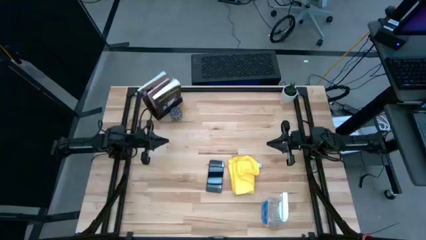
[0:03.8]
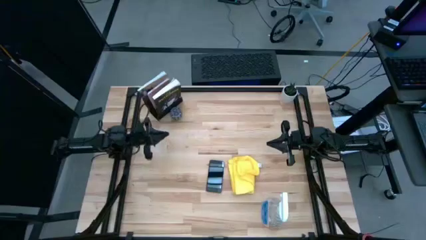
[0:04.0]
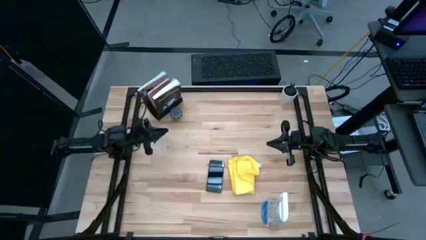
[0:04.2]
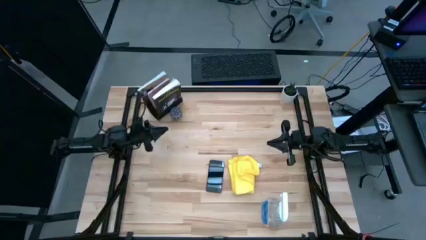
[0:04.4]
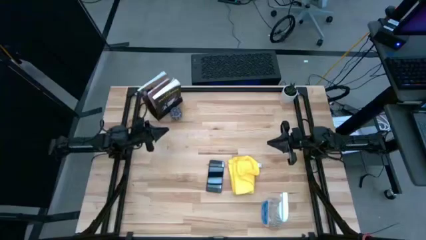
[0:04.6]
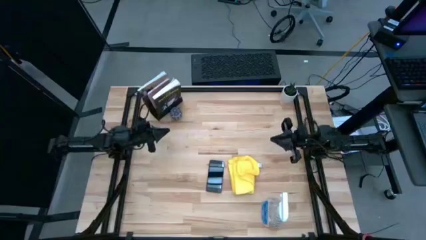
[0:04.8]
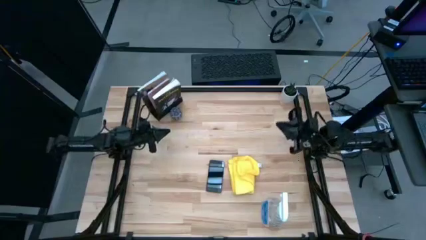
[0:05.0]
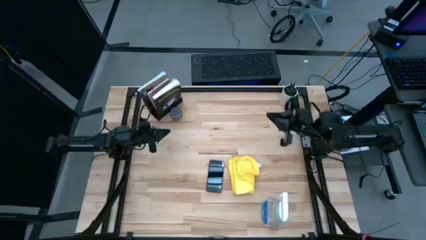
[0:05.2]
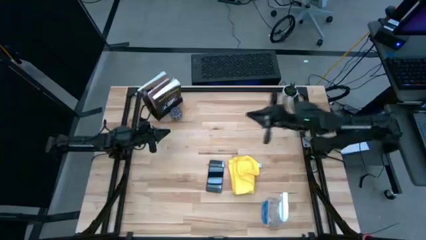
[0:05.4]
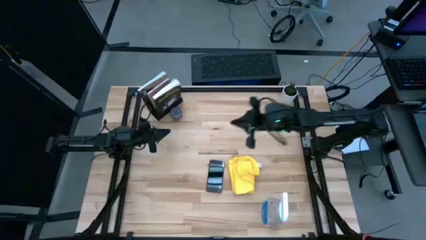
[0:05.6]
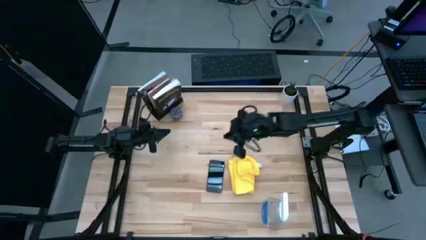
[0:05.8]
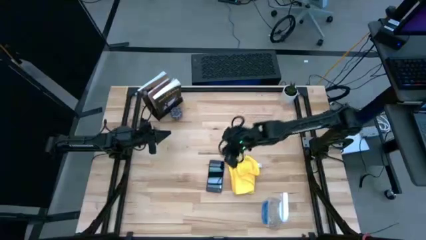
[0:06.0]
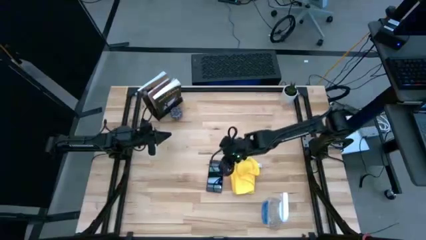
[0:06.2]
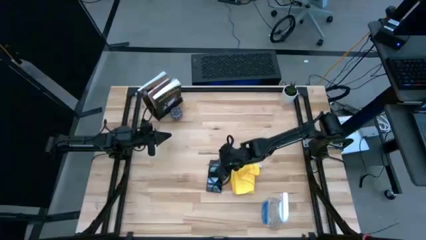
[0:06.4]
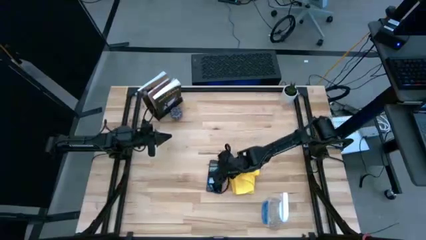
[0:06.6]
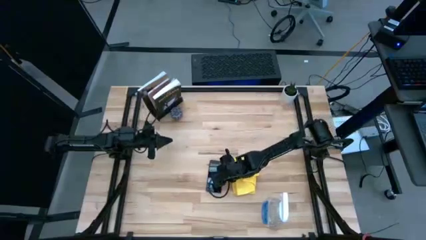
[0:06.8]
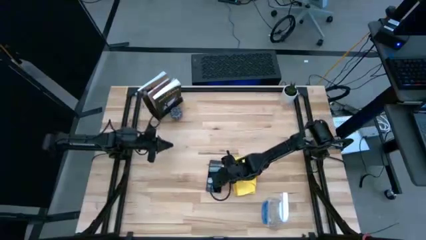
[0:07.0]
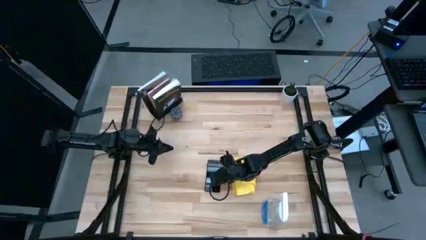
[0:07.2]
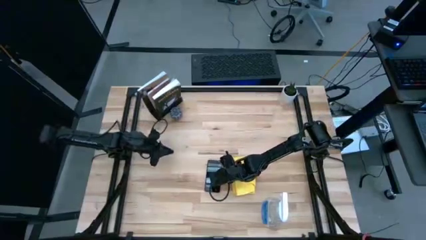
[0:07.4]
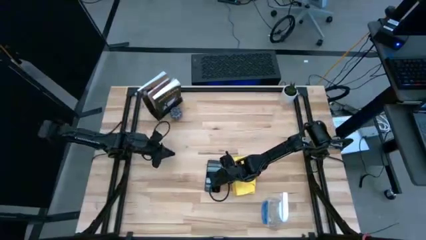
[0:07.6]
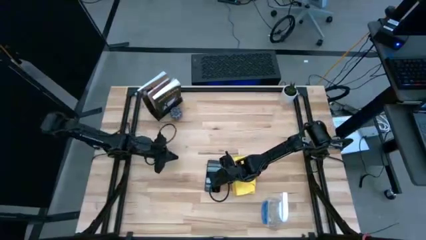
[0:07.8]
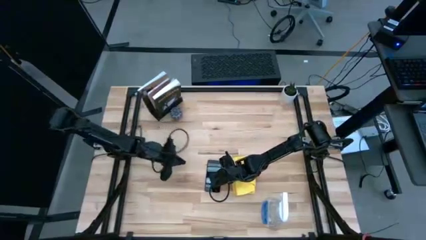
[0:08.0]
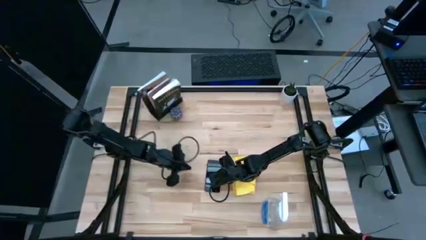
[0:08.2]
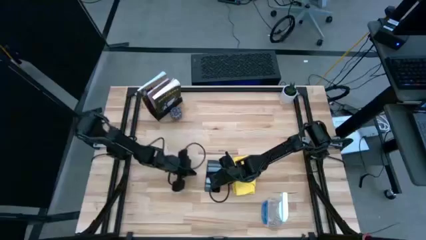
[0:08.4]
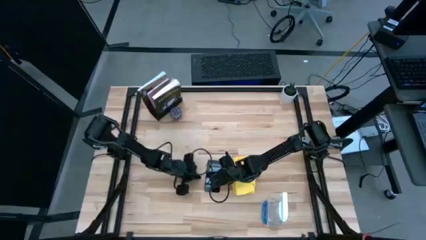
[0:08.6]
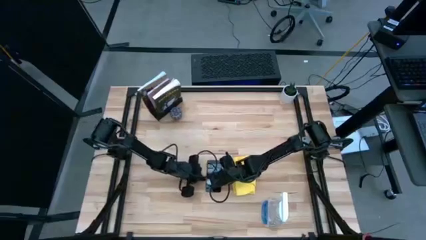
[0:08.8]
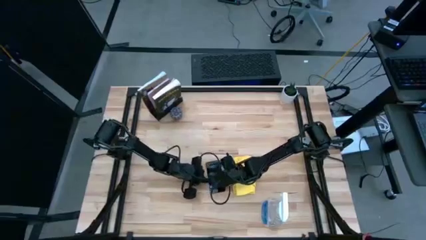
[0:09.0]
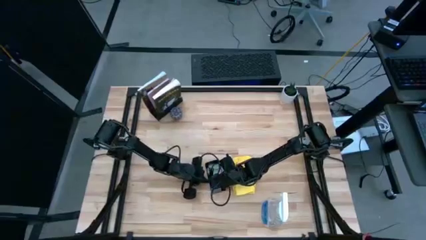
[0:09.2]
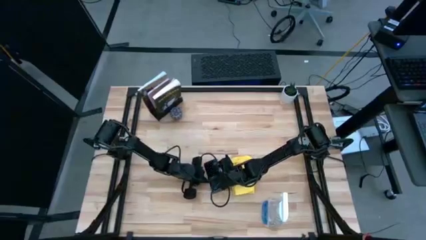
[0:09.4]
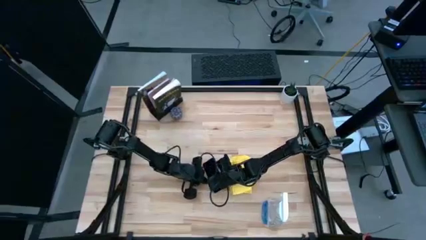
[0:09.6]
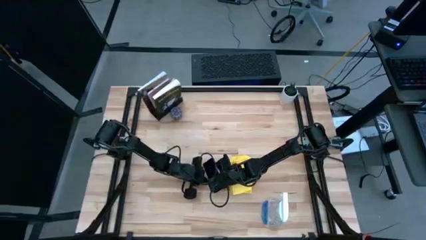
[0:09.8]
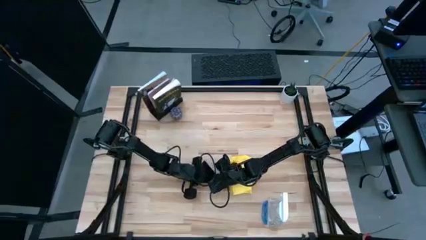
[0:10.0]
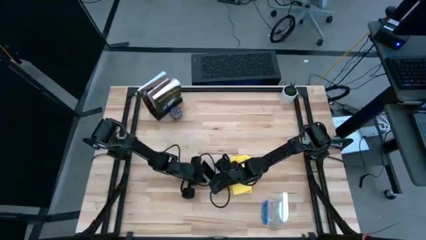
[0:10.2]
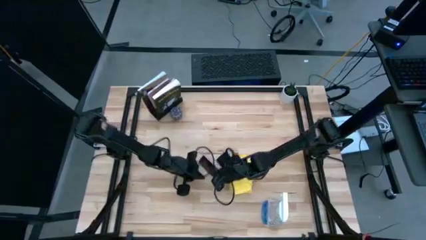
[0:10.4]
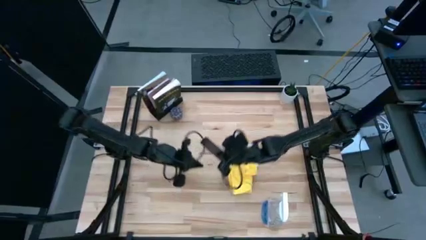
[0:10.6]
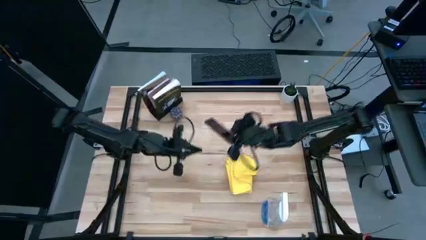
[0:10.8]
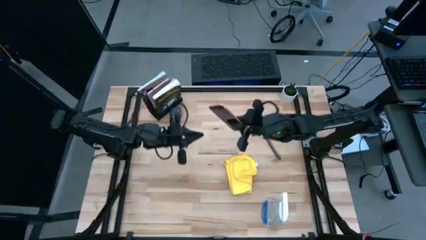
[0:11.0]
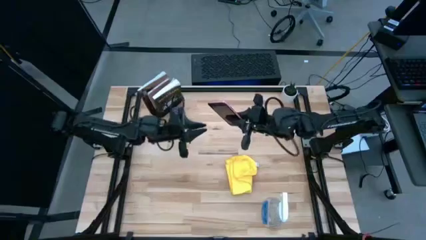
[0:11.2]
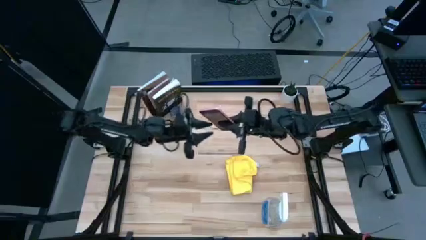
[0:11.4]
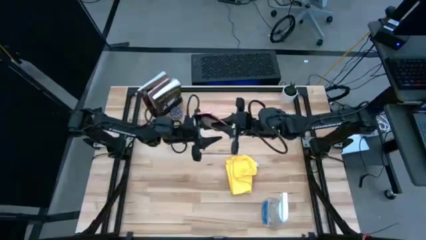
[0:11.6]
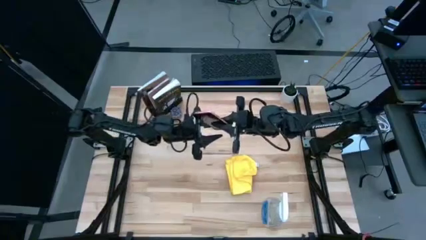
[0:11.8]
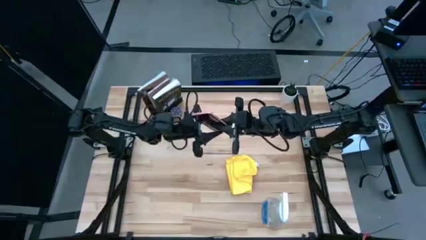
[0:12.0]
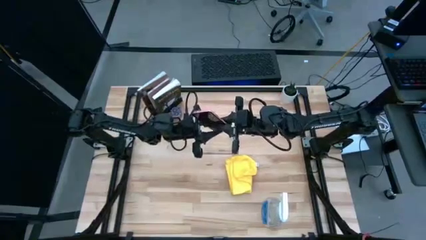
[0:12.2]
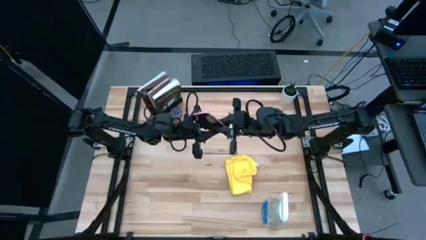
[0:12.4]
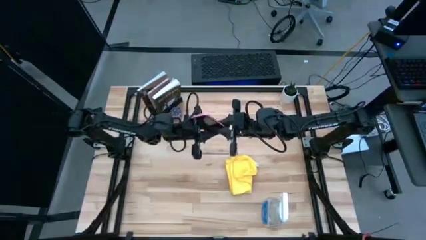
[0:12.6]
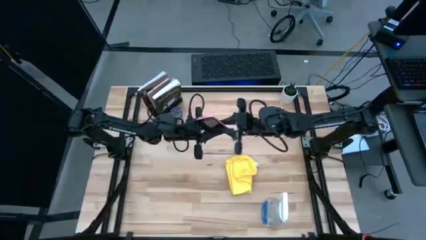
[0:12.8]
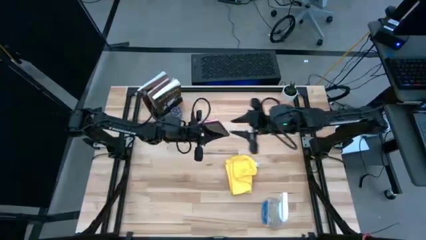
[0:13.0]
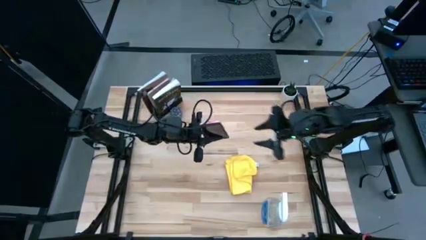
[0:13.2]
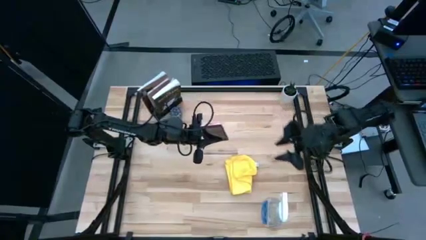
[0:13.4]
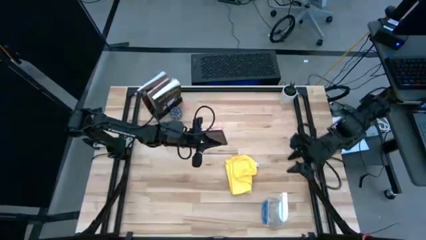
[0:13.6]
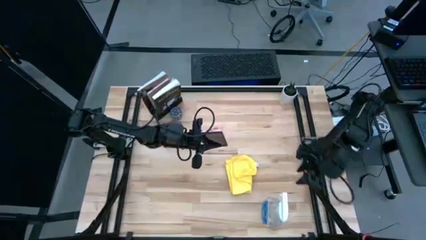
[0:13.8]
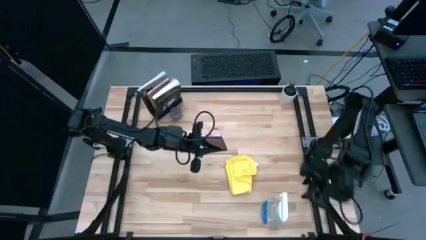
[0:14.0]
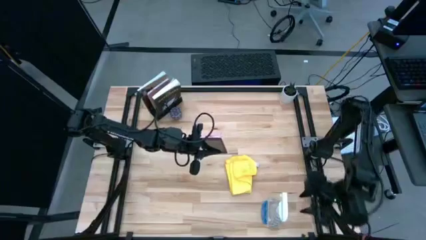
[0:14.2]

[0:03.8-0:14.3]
Task: Apply microfiber cloth
Spray the front of the pink cellphone using the spray bottle
